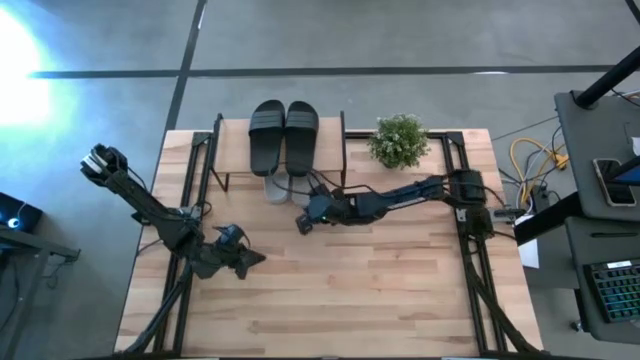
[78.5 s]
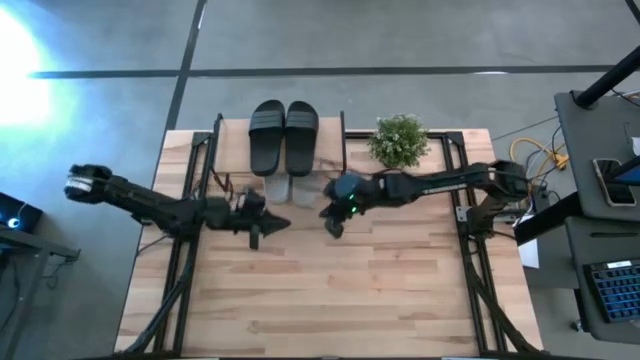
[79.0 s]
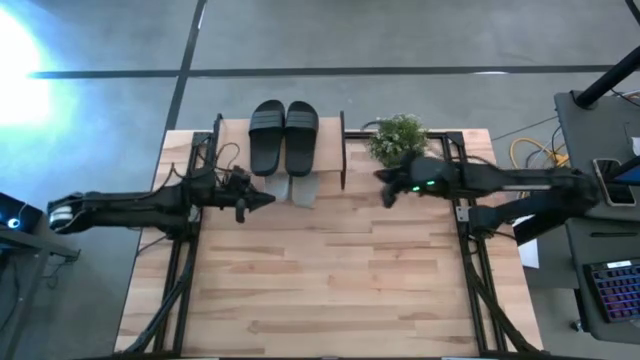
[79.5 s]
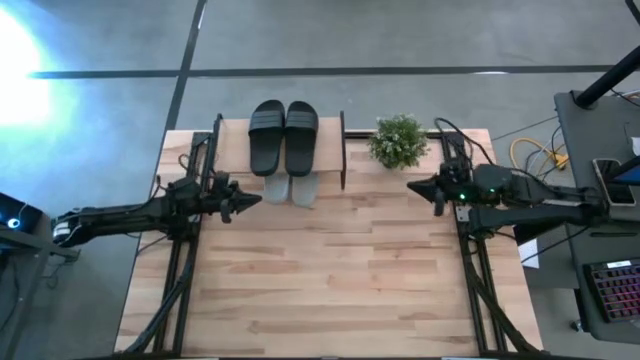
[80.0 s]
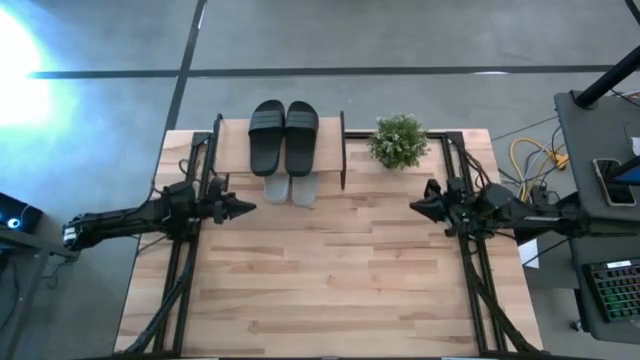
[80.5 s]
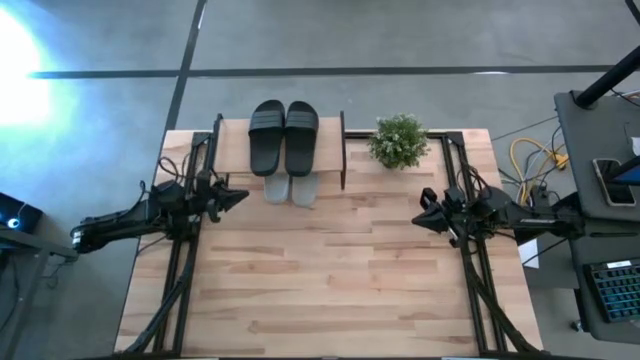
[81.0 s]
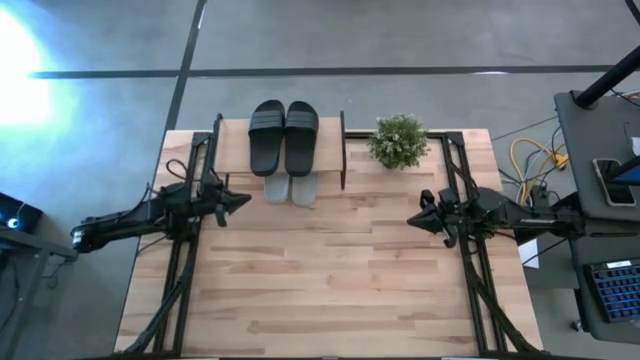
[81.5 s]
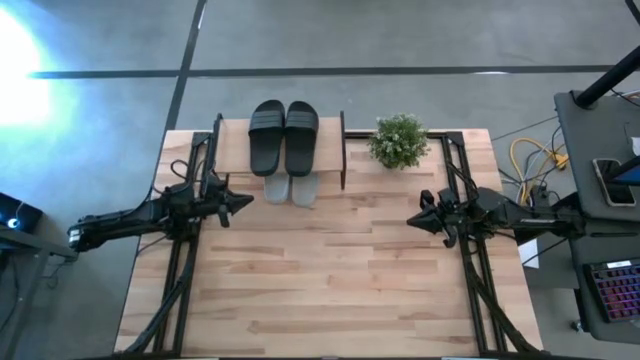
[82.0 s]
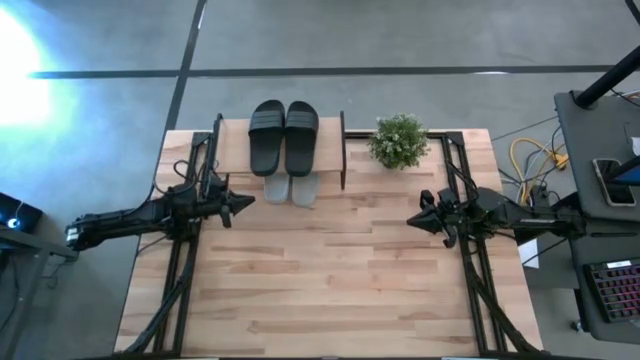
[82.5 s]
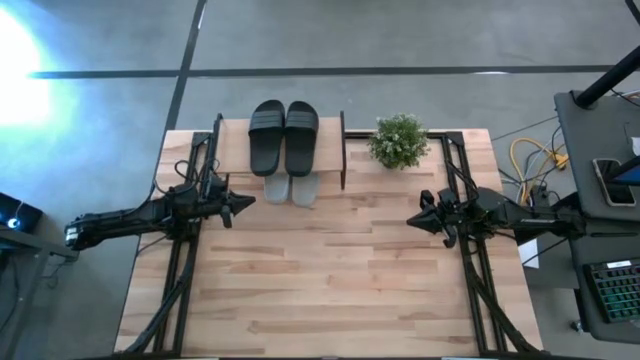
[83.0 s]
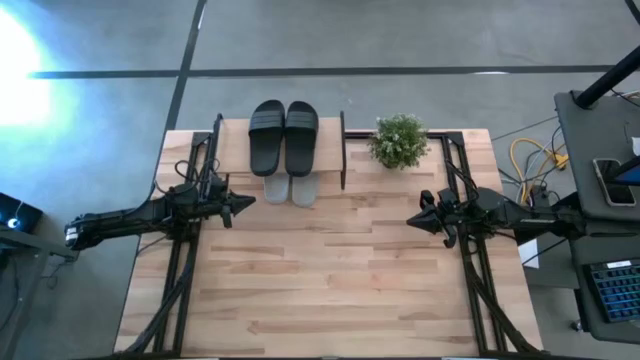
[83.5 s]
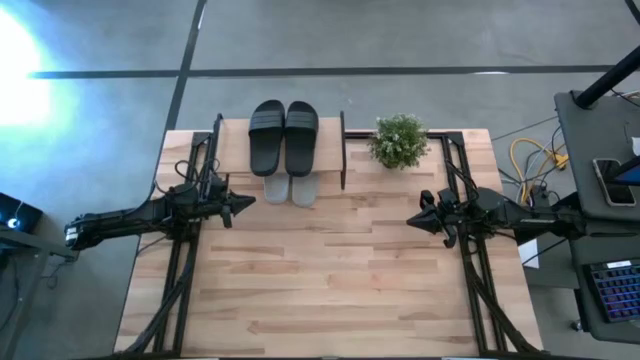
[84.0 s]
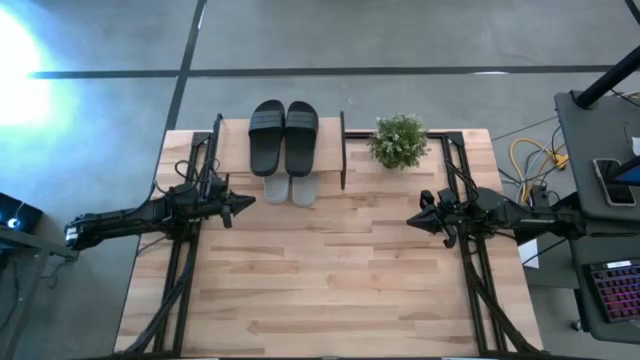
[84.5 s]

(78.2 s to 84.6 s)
Task: Pick and place slides into the shelf
Return to Home Position

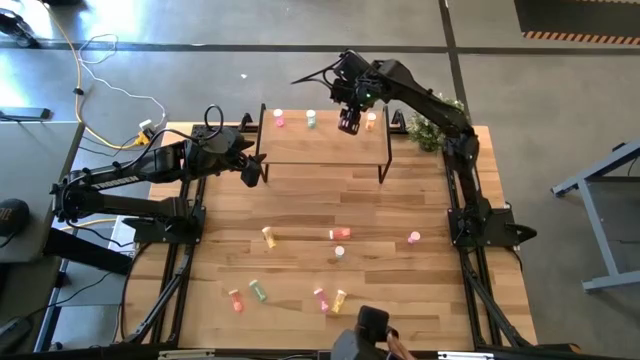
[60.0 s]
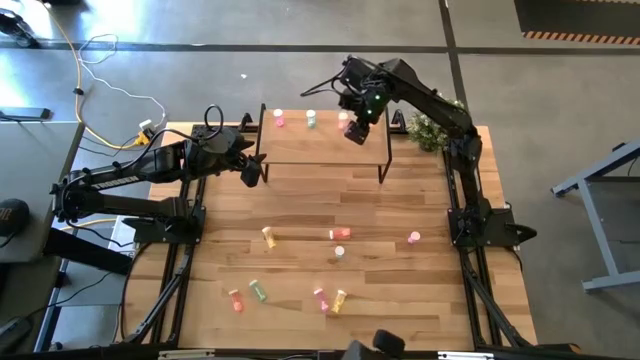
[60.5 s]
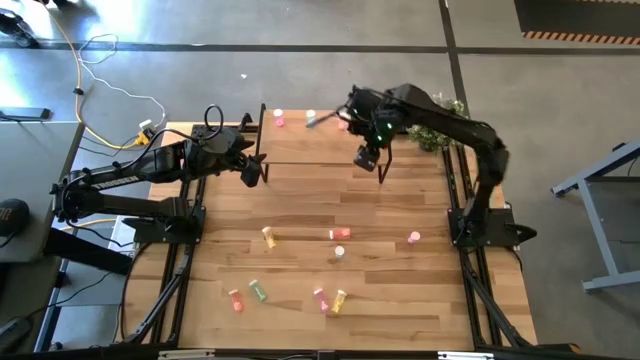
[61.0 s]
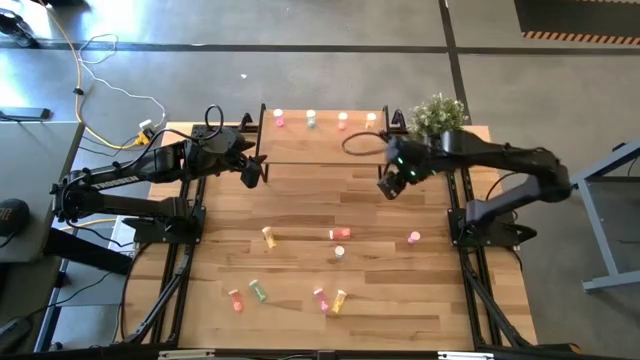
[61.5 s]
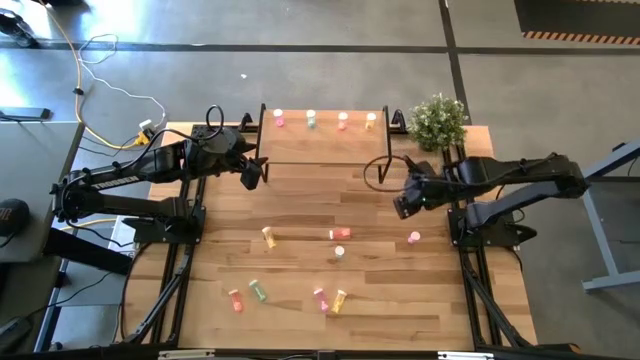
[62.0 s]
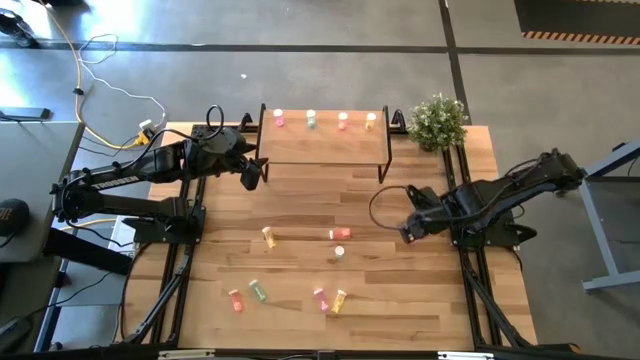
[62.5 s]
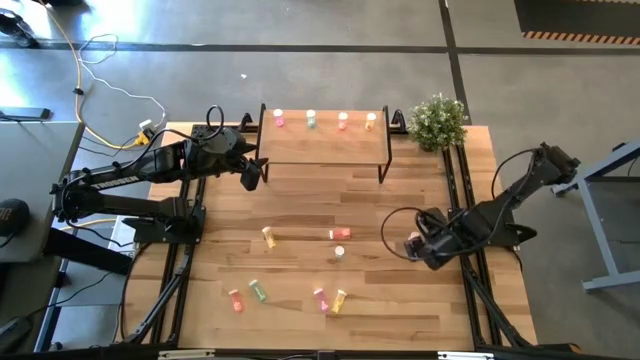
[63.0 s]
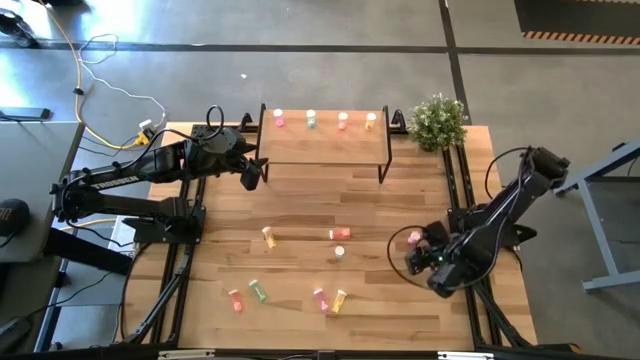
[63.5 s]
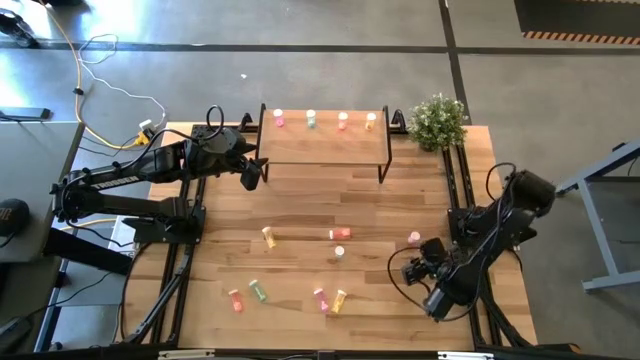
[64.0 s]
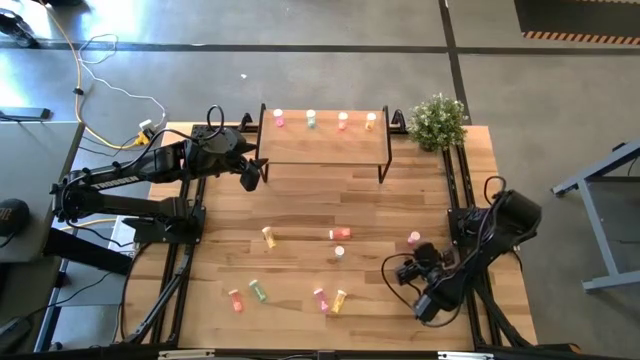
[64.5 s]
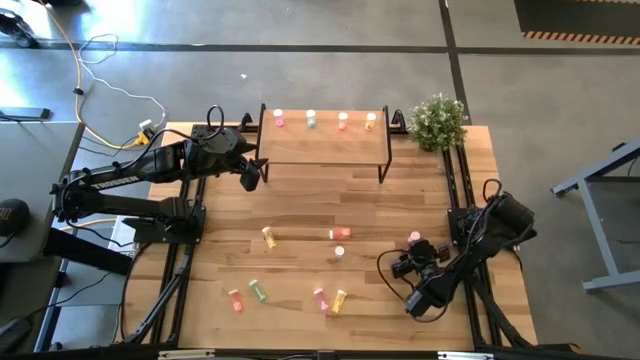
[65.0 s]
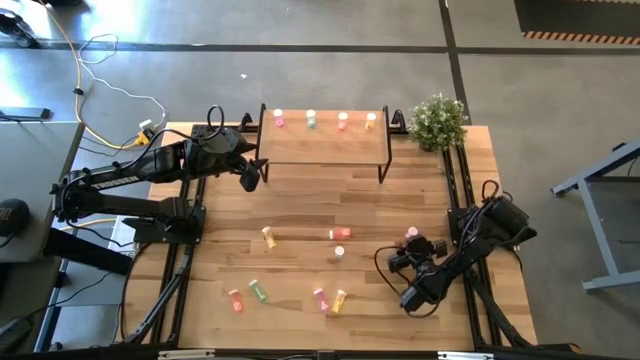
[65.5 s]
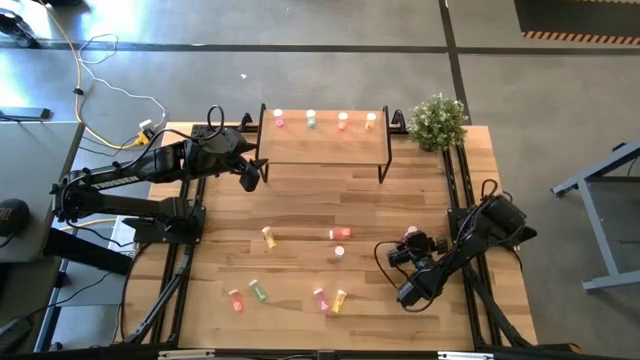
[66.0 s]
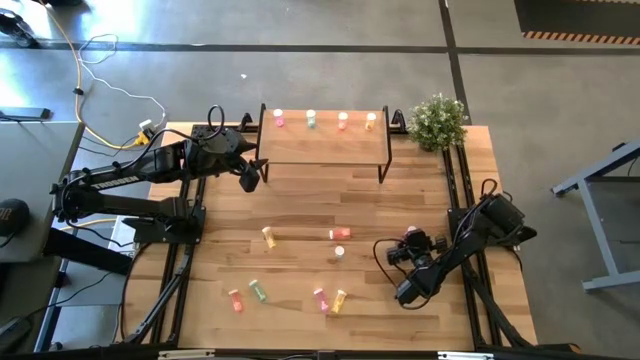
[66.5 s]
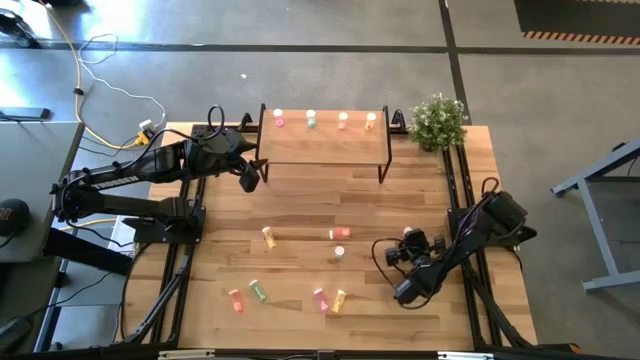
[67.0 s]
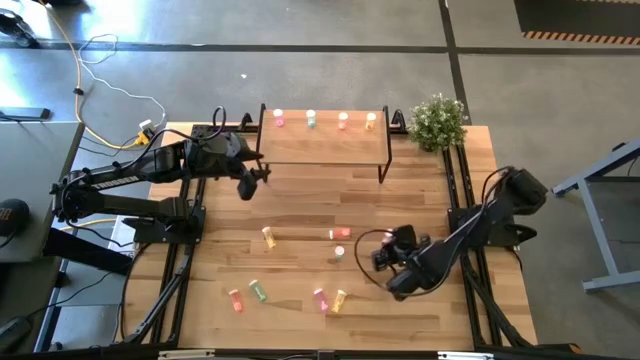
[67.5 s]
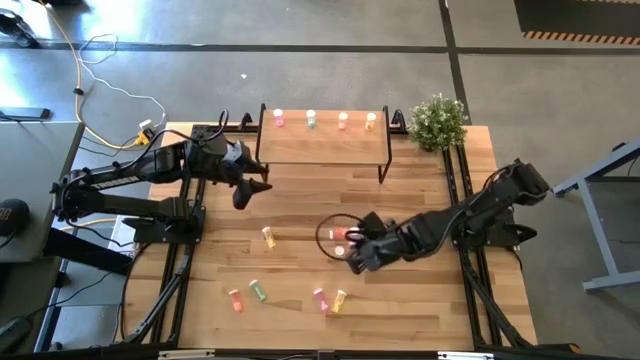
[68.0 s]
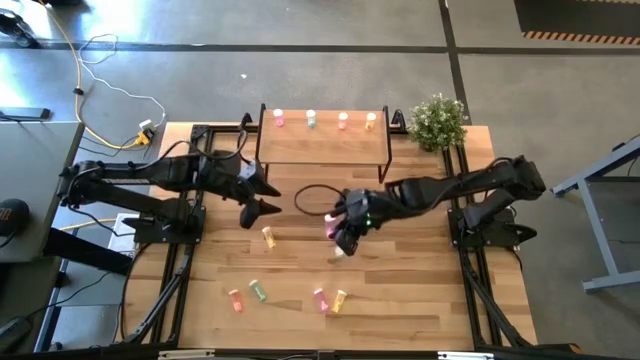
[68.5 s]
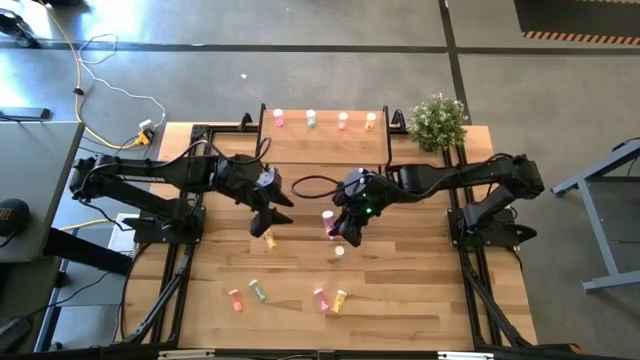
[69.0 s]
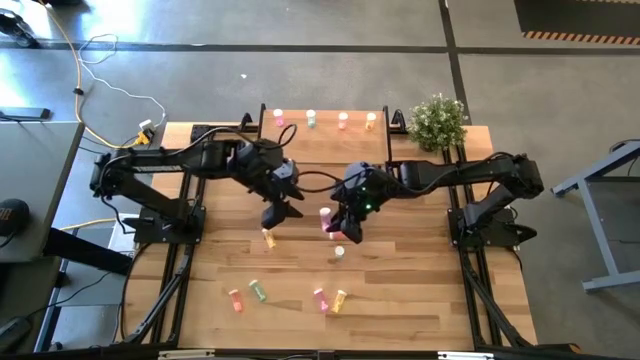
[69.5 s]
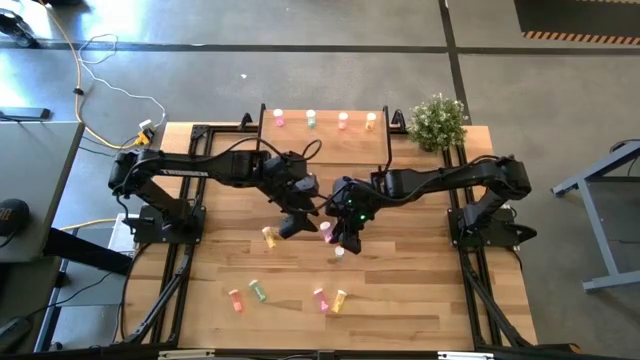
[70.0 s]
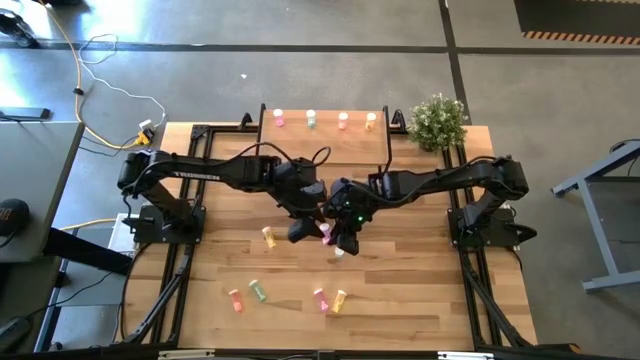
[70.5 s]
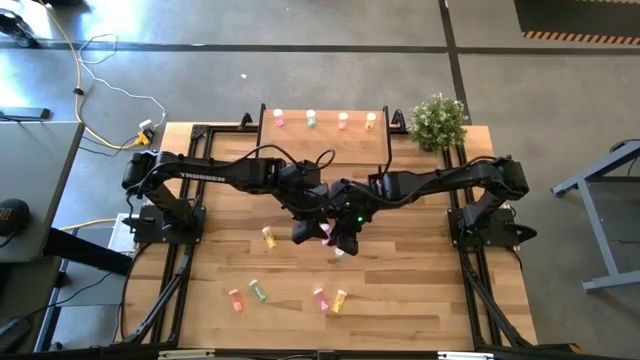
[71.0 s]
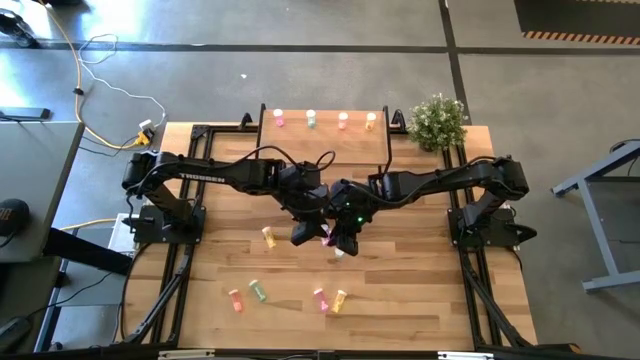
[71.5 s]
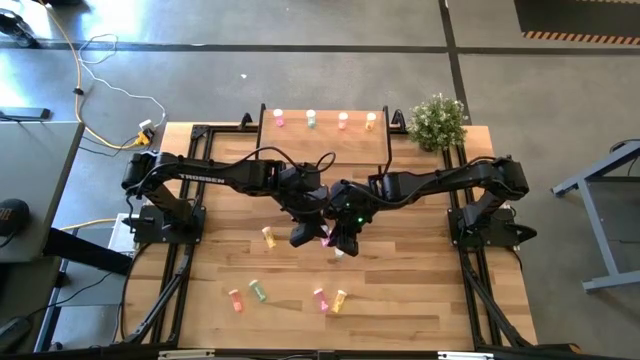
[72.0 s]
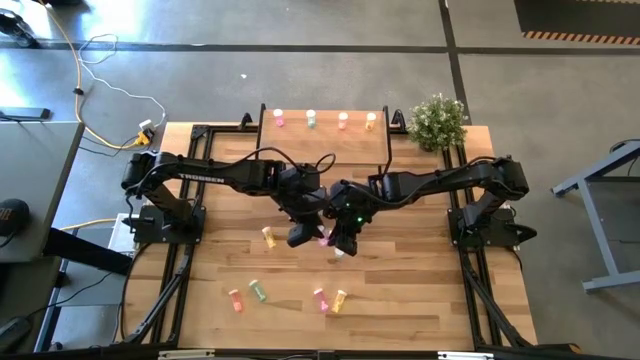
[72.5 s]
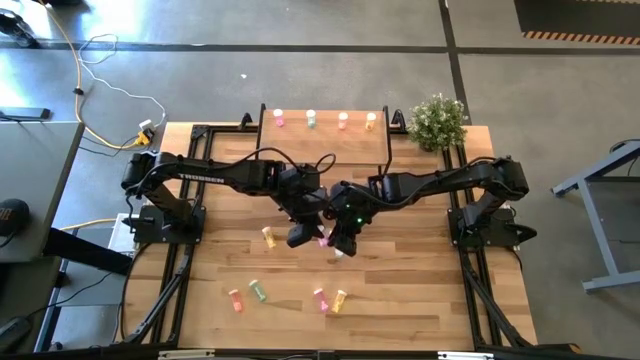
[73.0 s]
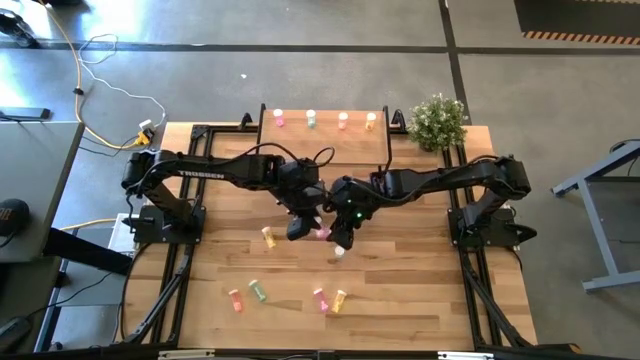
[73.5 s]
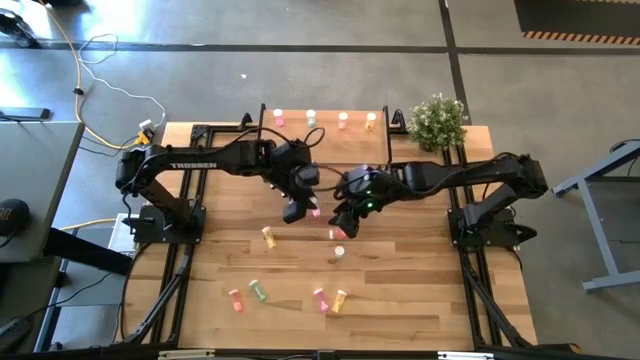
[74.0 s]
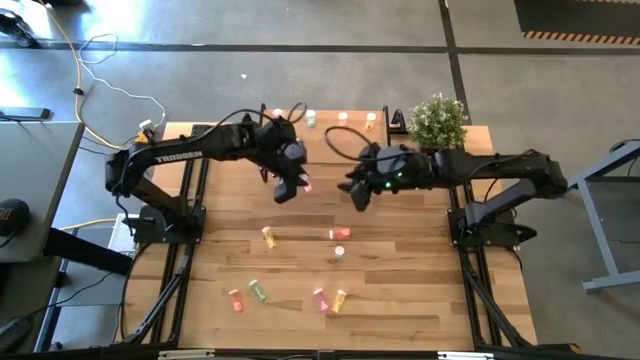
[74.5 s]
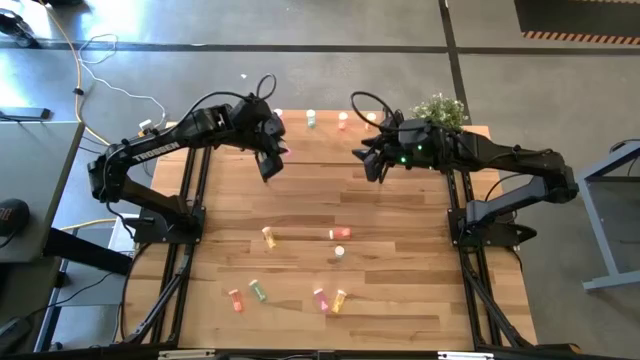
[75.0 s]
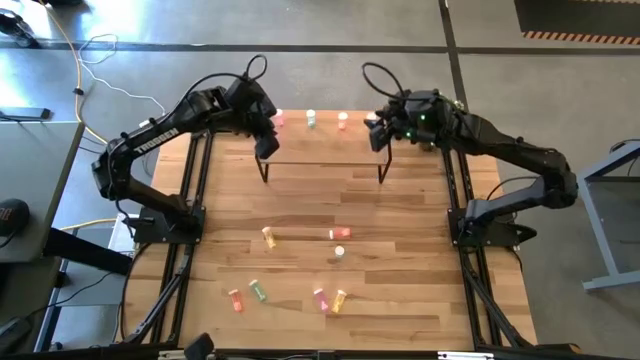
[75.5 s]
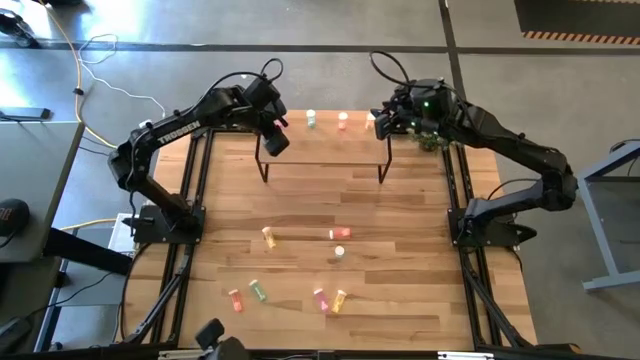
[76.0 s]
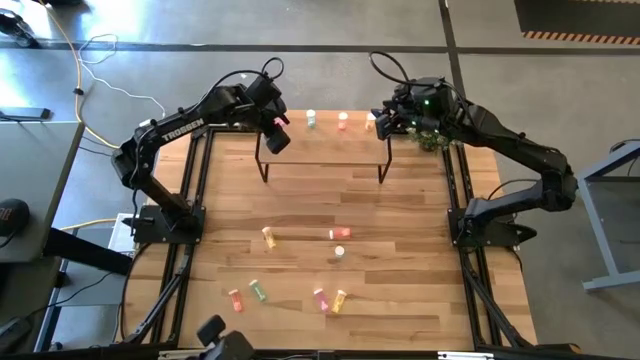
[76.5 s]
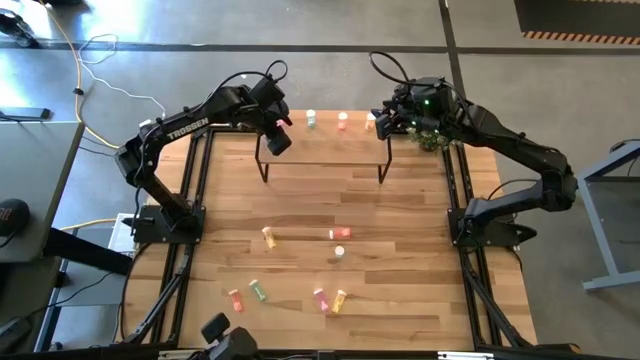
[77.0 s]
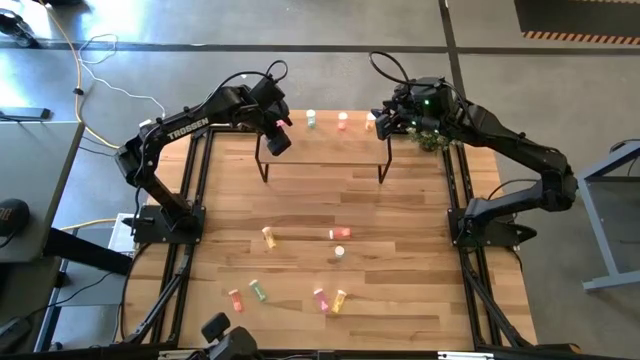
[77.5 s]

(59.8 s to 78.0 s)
Task: Pick and place medicine bottles onto shelf by color
Put the top pink pill bottle on the shelf aligned with the other pink pill bottle
